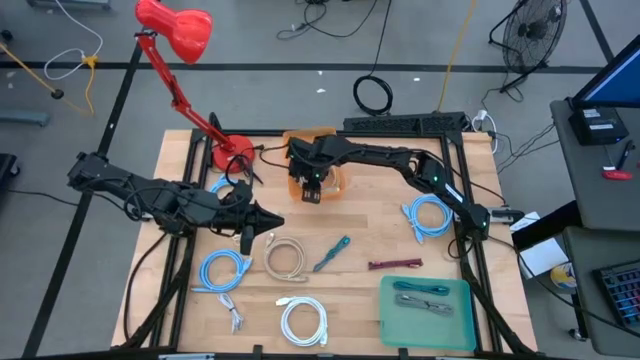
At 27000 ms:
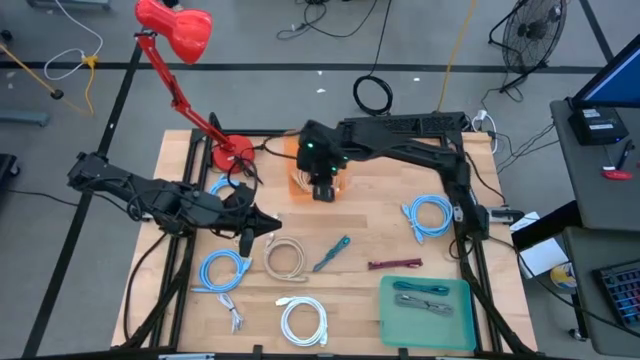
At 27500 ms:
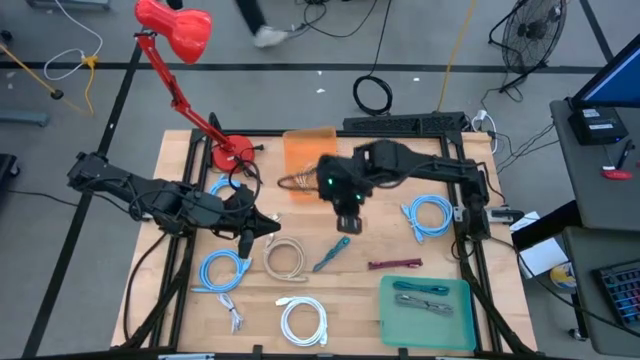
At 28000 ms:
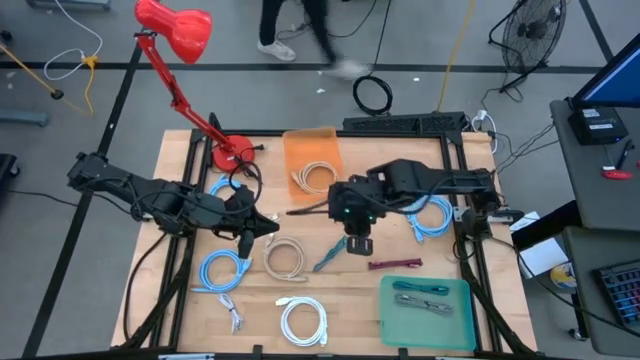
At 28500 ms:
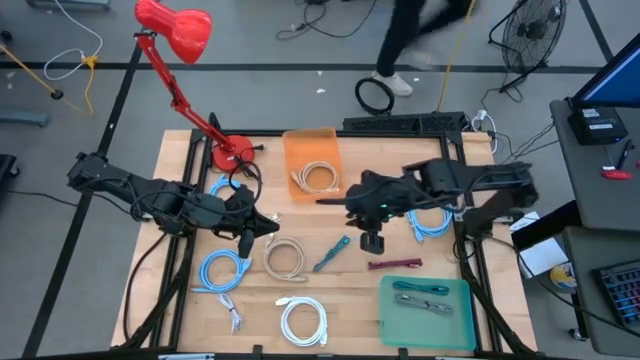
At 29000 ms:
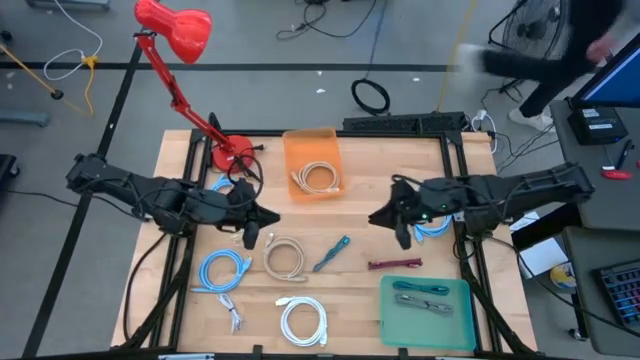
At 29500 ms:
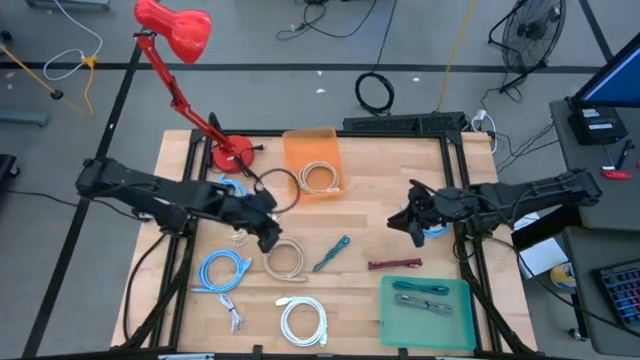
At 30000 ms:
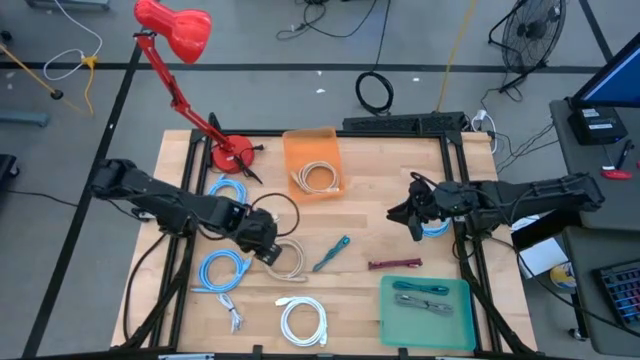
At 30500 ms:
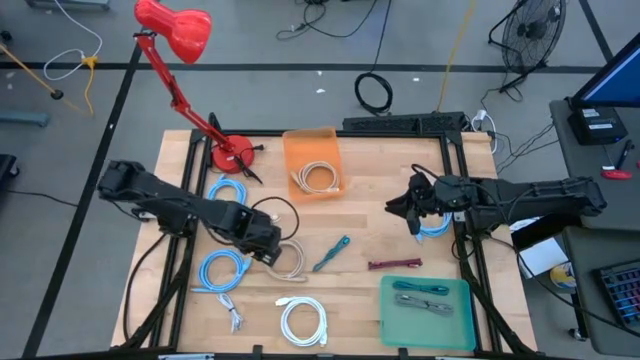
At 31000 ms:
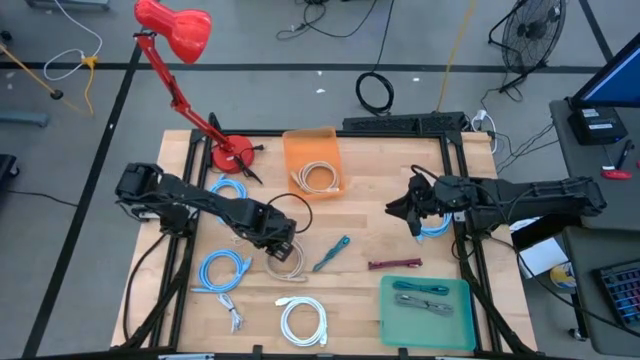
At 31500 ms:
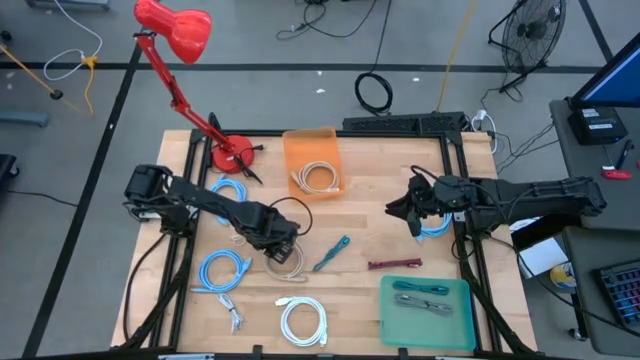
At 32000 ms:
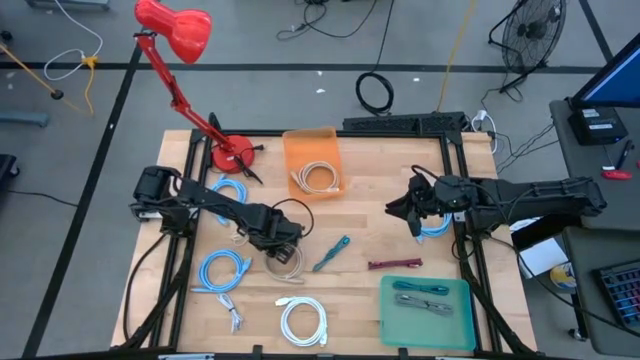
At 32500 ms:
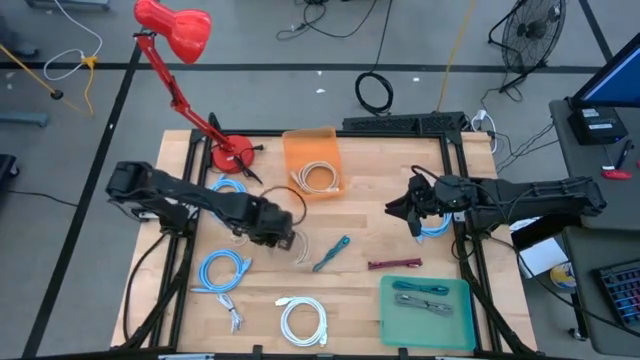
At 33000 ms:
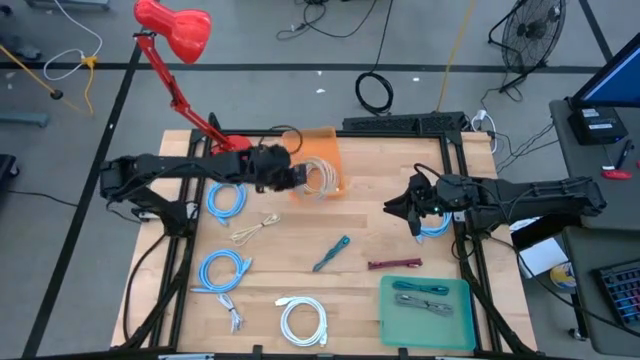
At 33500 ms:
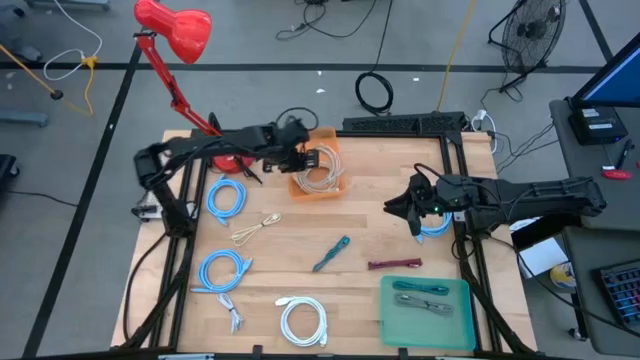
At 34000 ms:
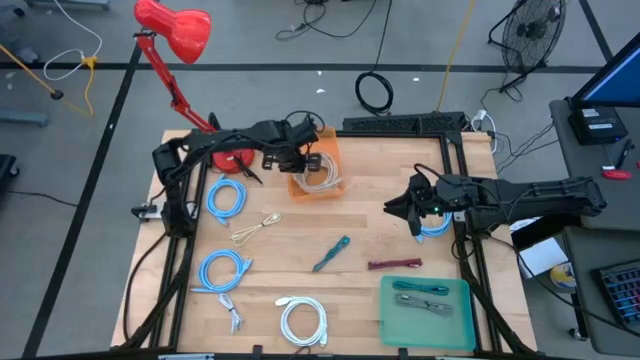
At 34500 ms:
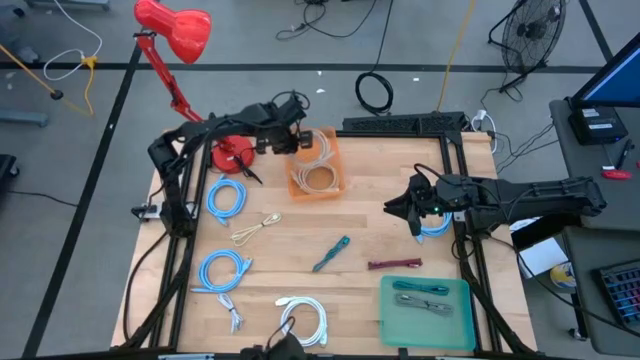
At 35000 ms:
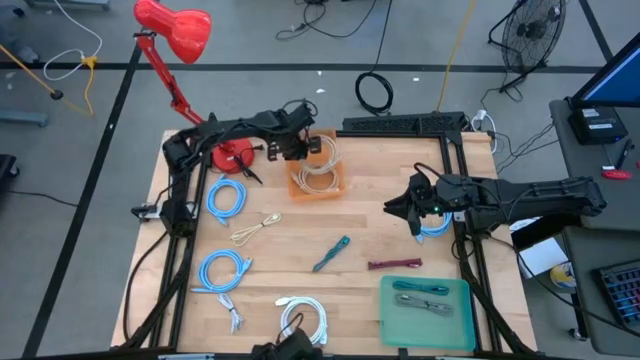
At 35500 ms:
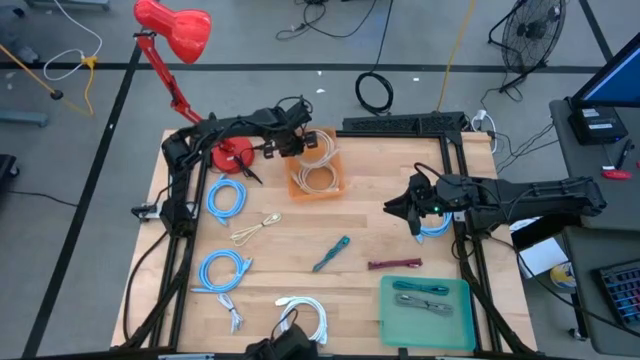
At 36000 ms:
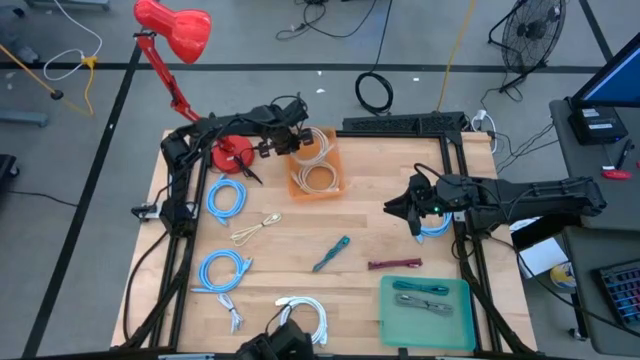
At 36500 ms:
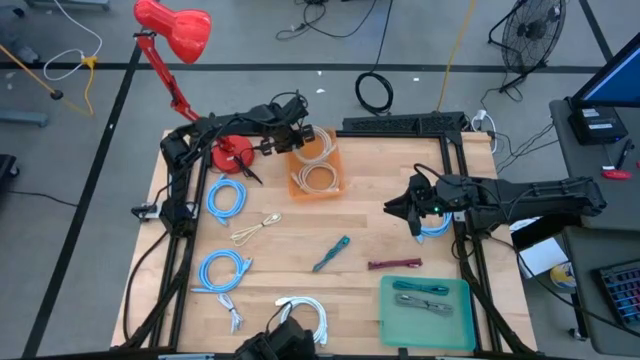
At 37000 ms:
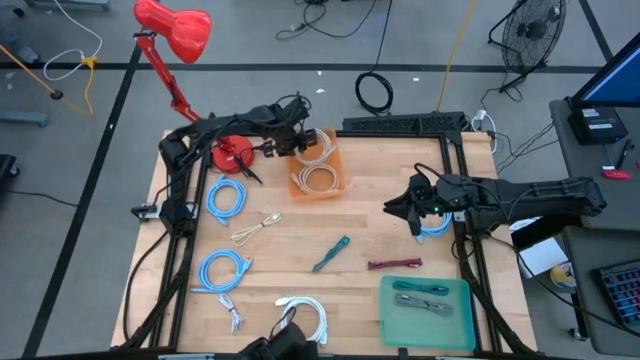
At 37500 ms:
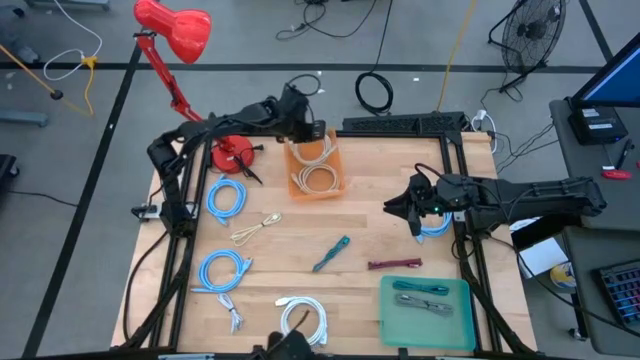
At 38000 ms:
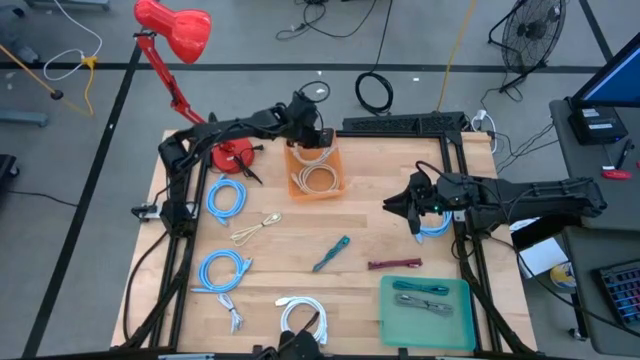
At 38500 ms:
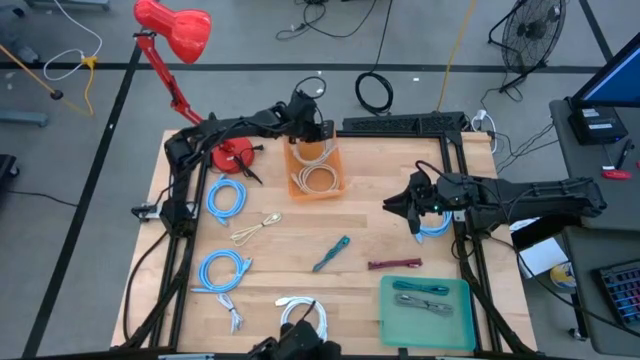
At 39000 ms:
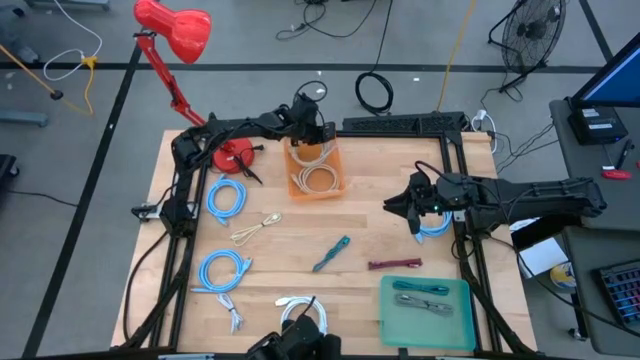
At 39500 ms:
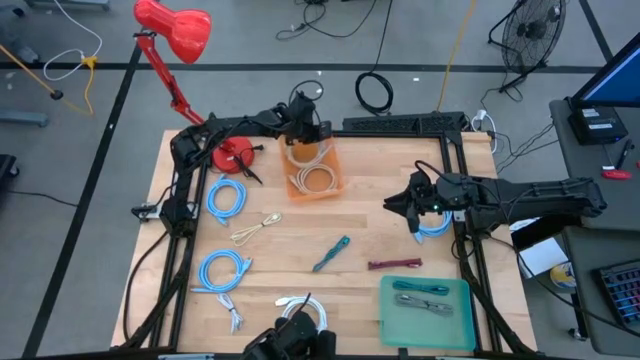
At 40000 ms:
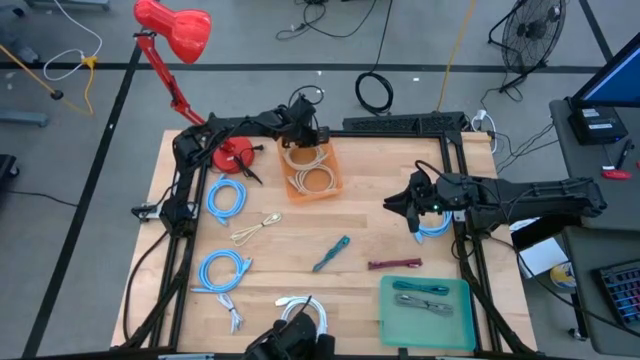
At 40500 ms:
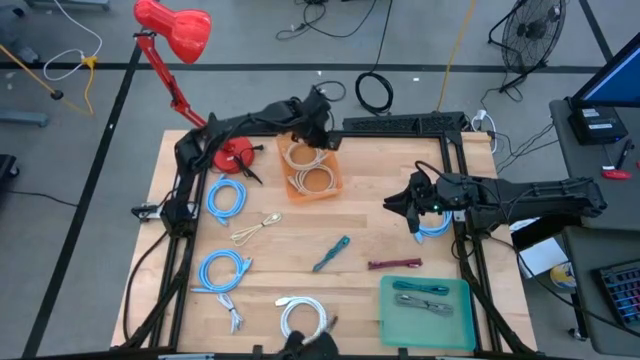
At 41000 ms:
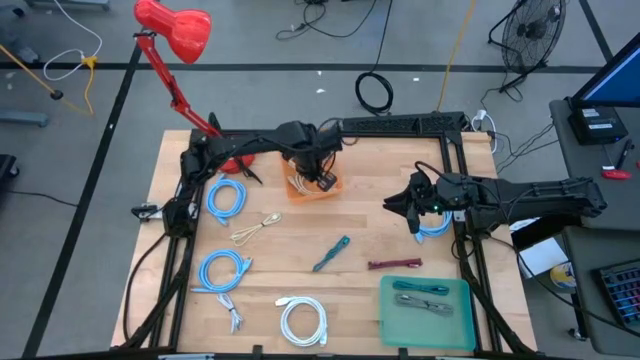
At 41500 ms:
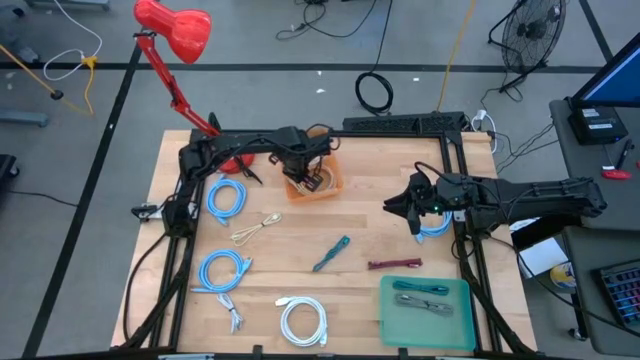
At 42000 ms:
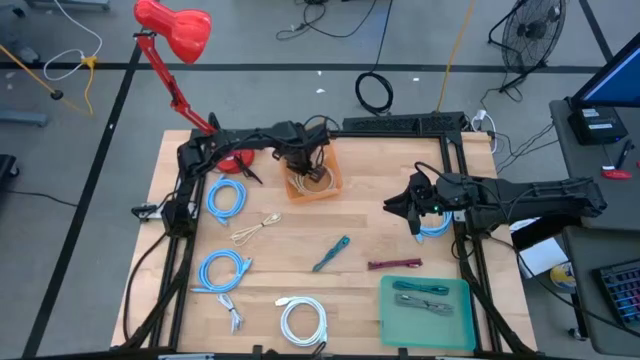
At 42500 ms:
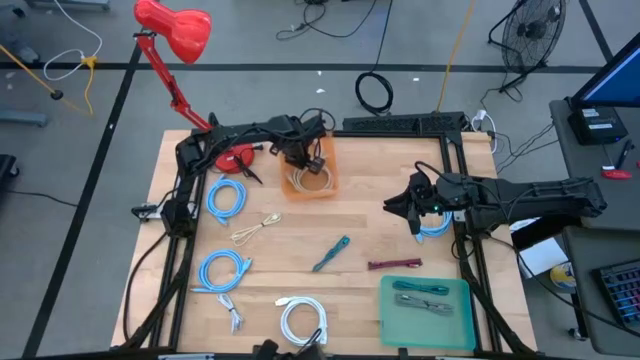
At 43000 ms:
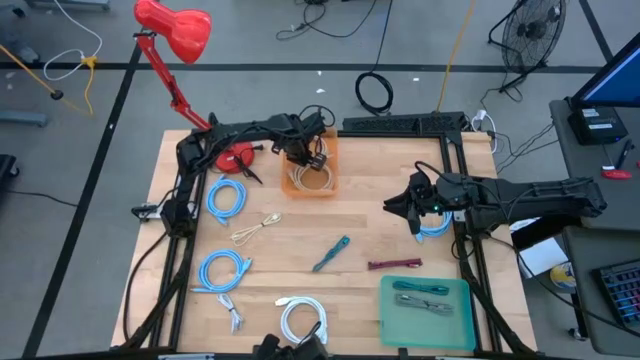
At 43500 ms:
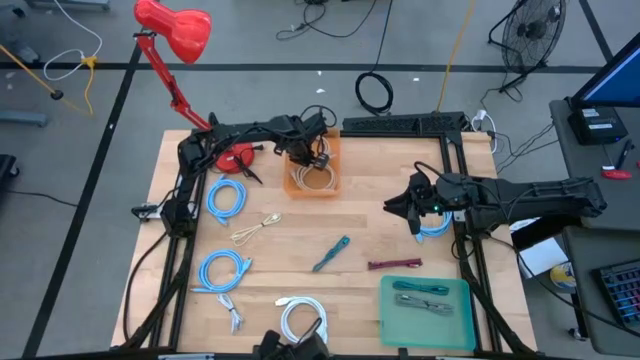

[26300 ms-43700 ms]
Task: Pick & Place USB Port
Put the light brown wire cable into the orange bin

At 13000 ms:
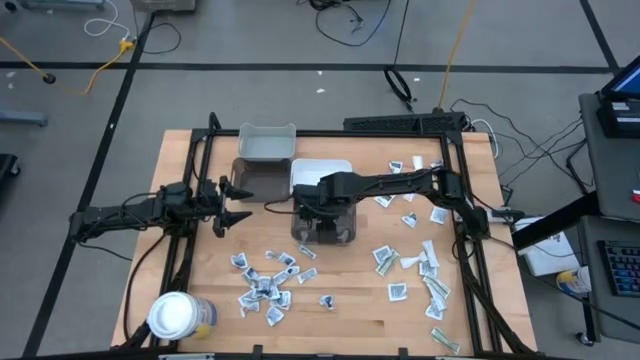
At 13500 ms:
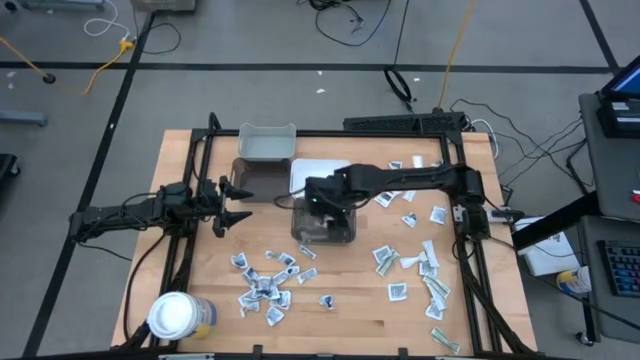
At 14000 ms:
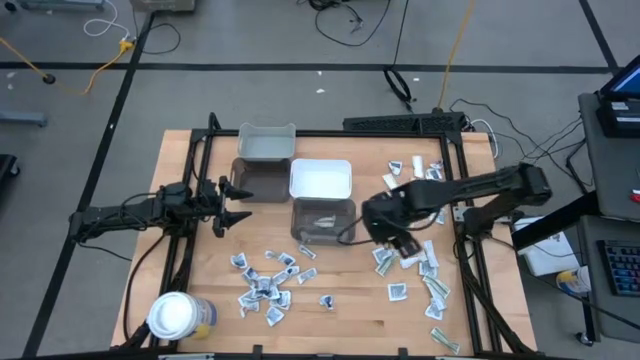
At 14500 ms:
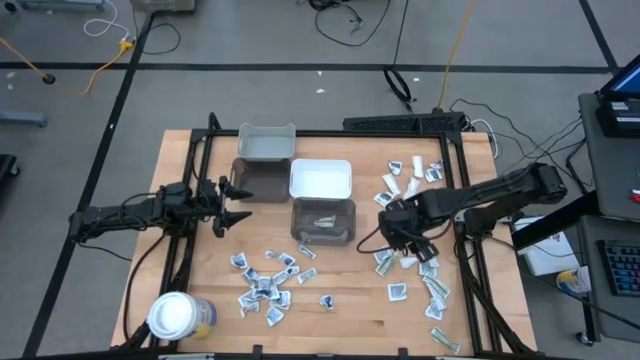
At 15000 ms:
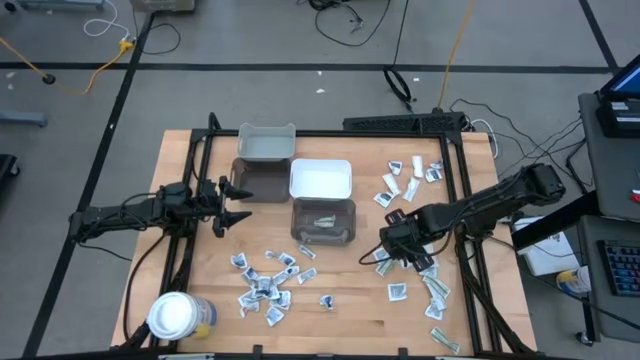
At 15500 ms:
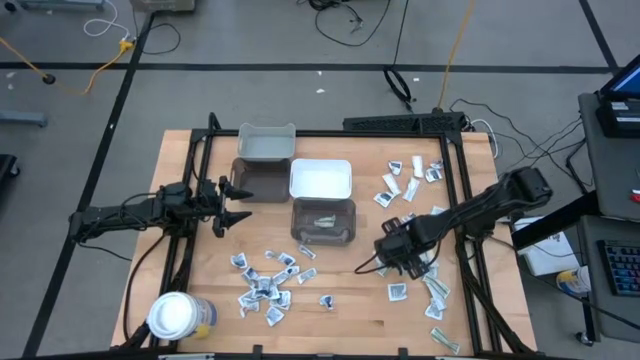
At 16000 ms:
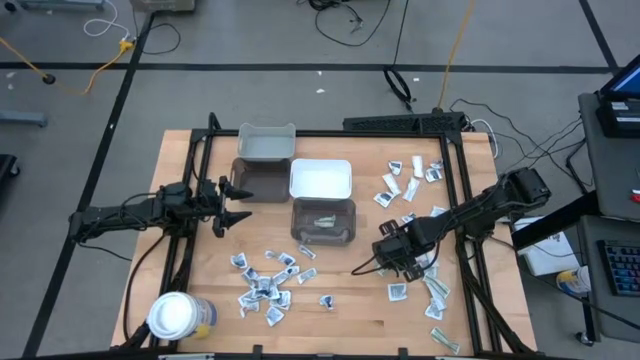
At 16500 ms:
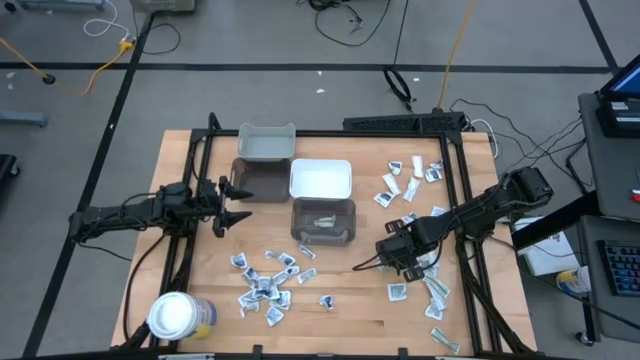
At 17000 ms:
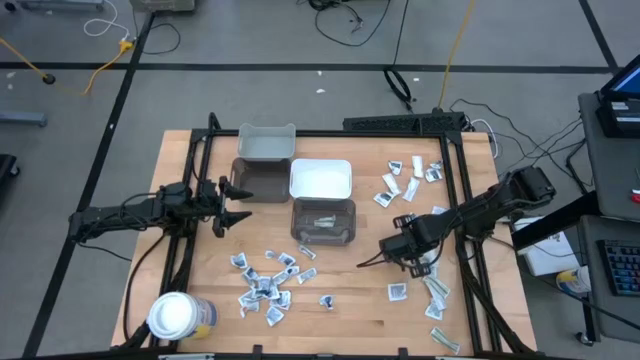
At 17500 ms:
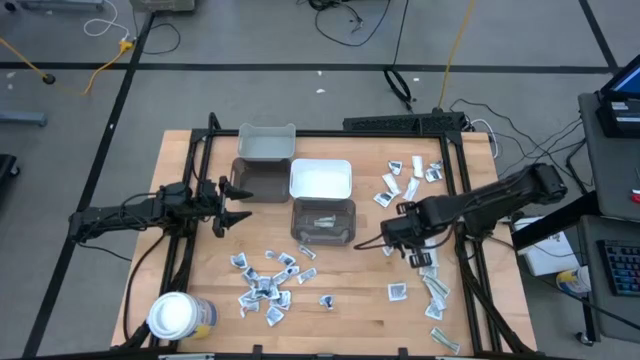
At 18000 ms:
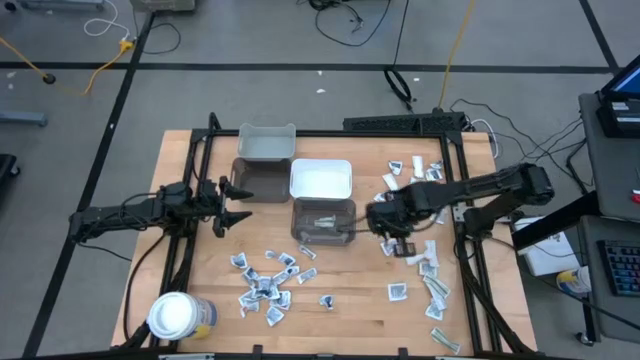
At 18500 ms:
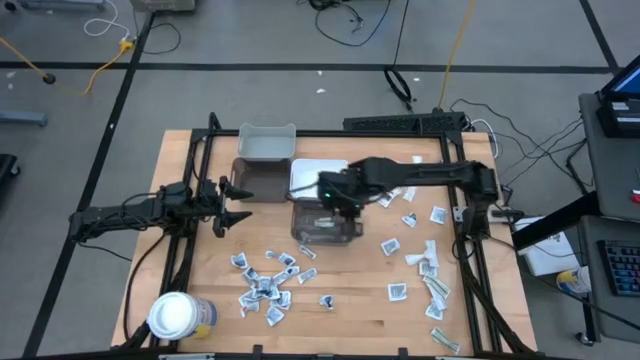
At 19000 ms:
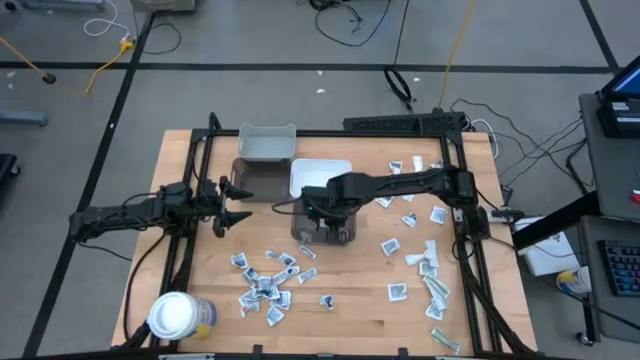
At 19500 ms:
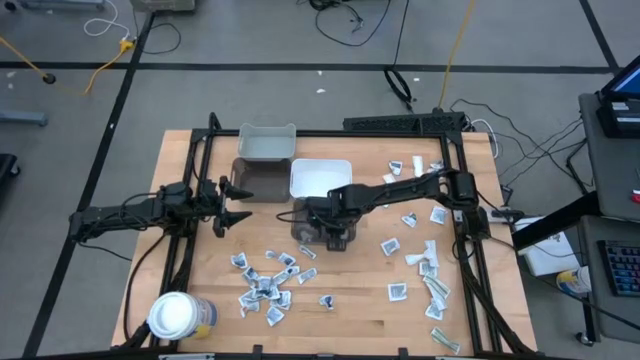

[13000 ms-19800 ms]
Task: Pick & Place First Aid Supplies
Put the green bandage pack into the right black bin
